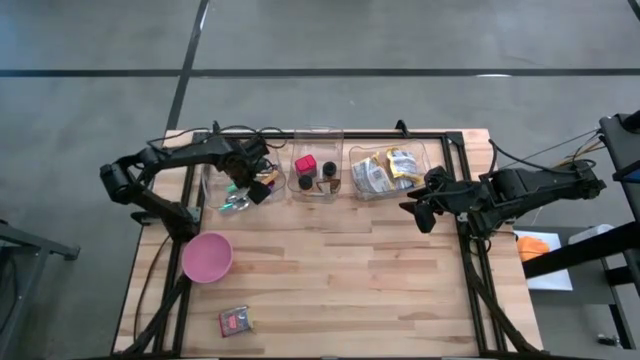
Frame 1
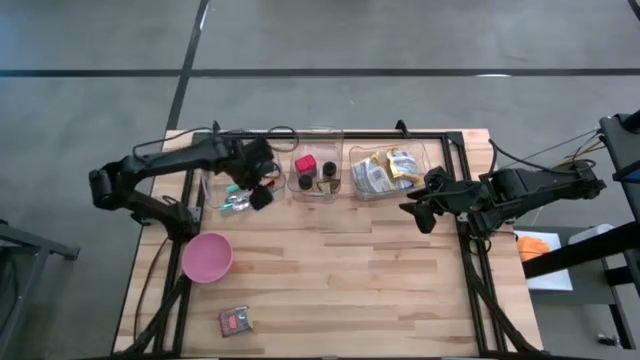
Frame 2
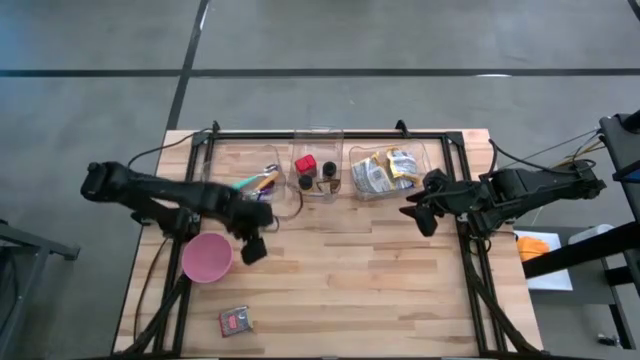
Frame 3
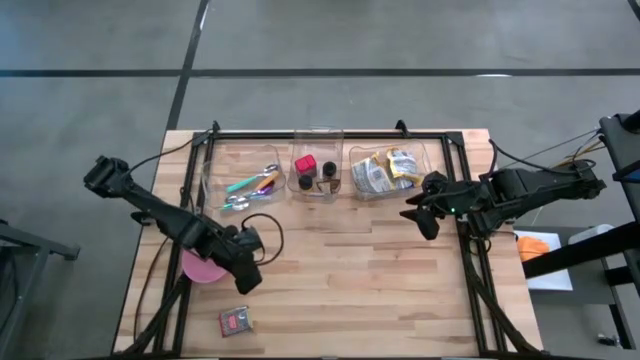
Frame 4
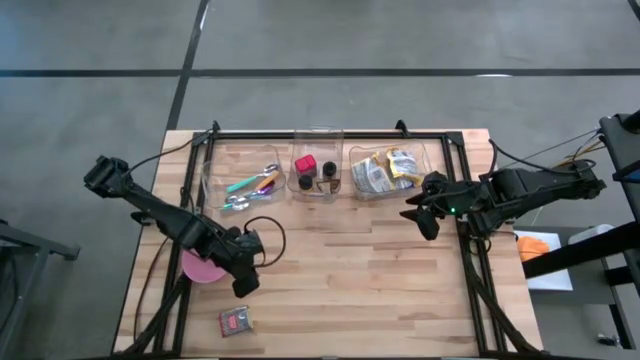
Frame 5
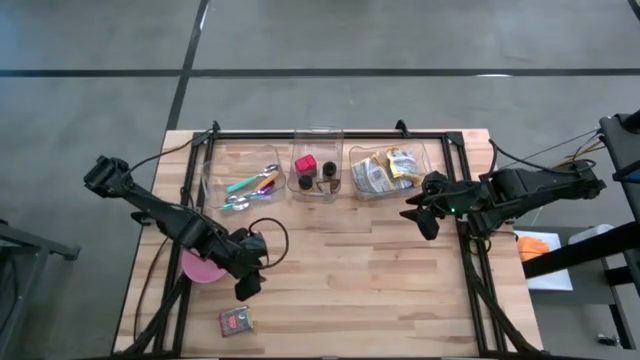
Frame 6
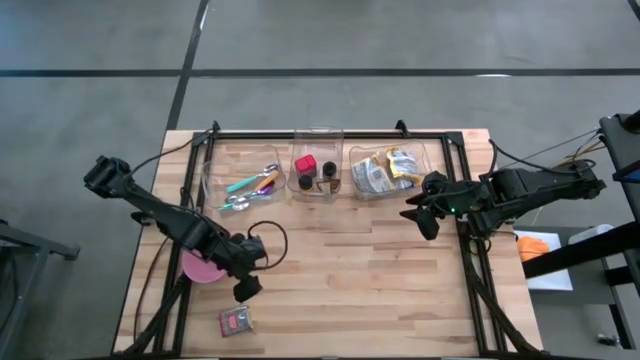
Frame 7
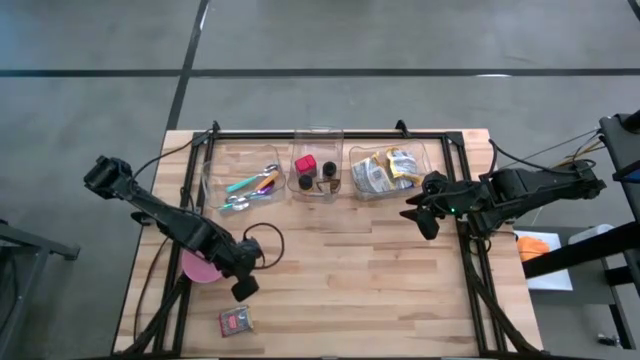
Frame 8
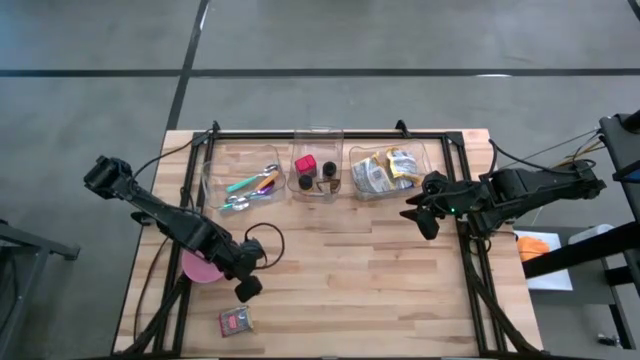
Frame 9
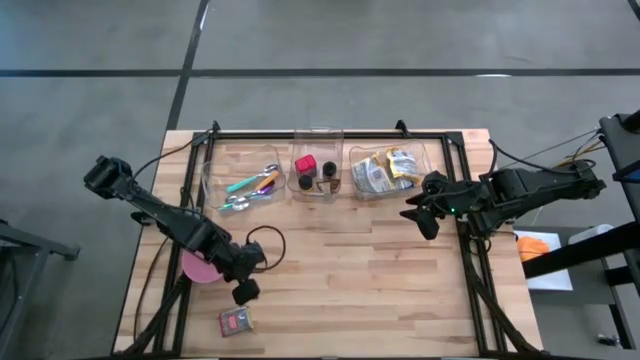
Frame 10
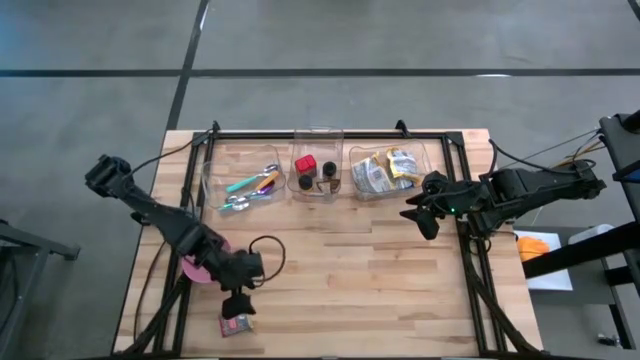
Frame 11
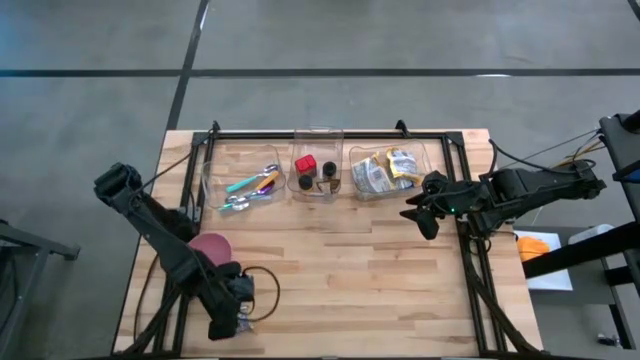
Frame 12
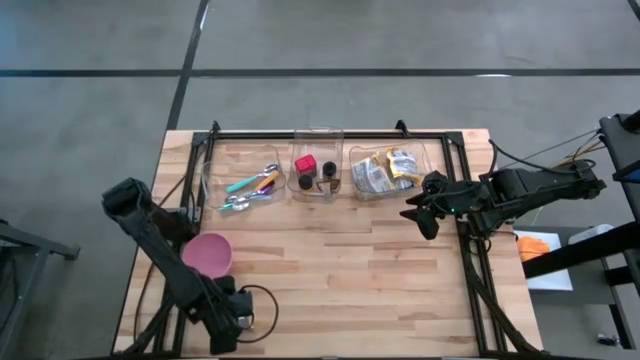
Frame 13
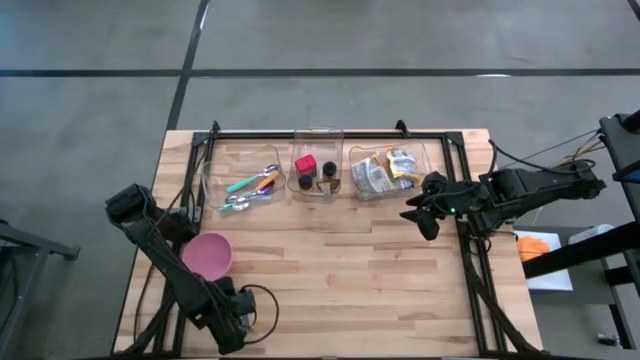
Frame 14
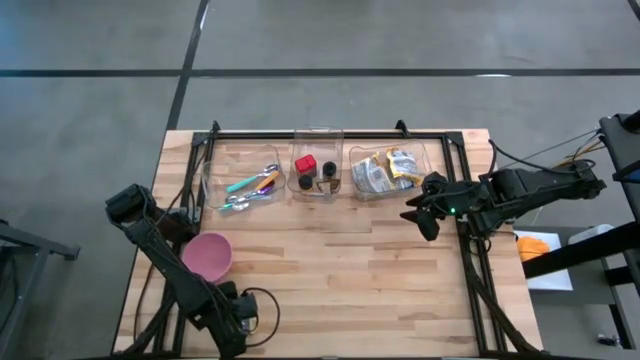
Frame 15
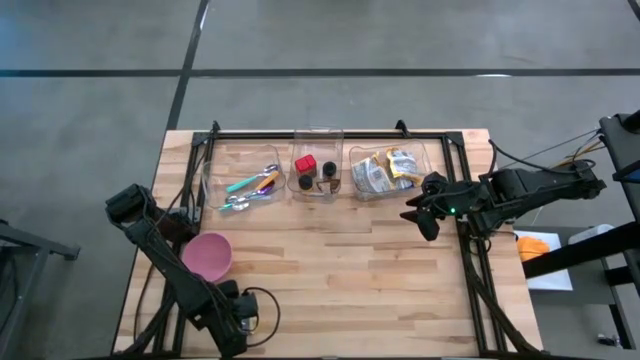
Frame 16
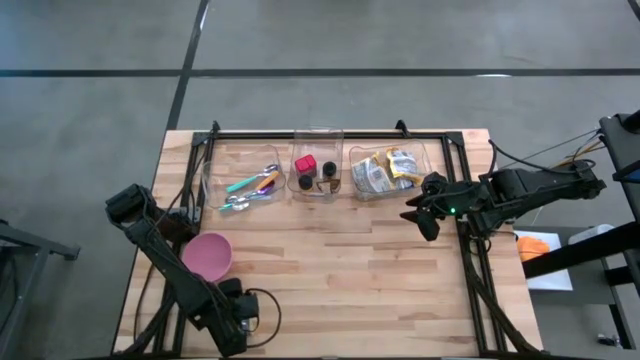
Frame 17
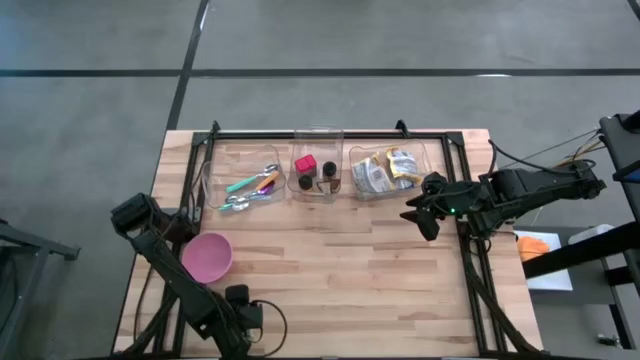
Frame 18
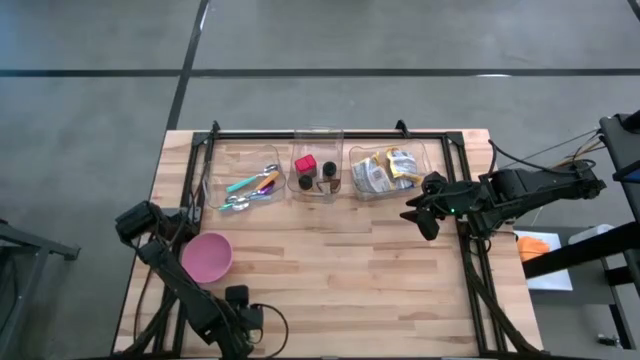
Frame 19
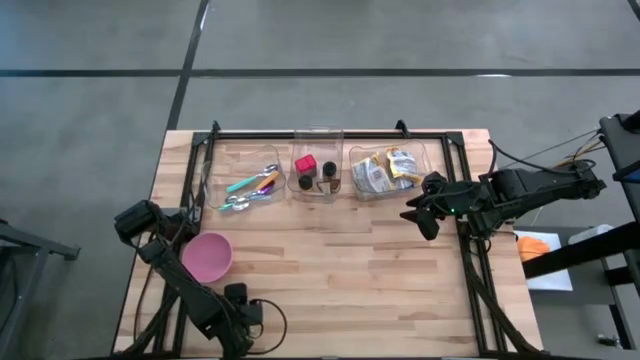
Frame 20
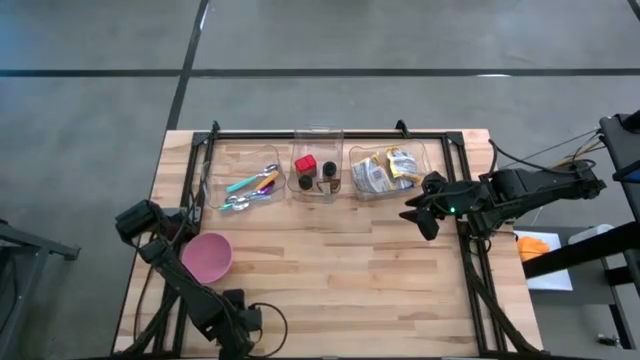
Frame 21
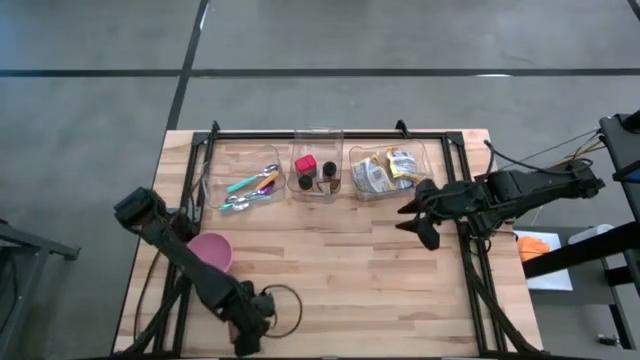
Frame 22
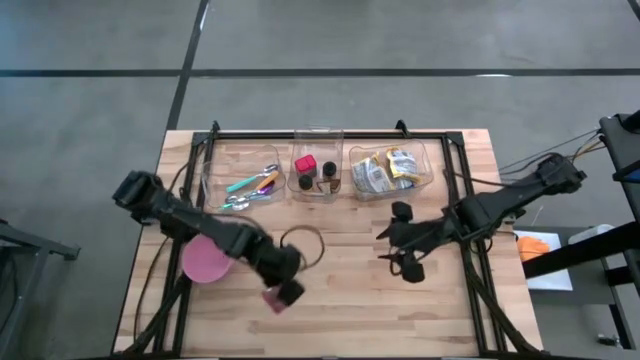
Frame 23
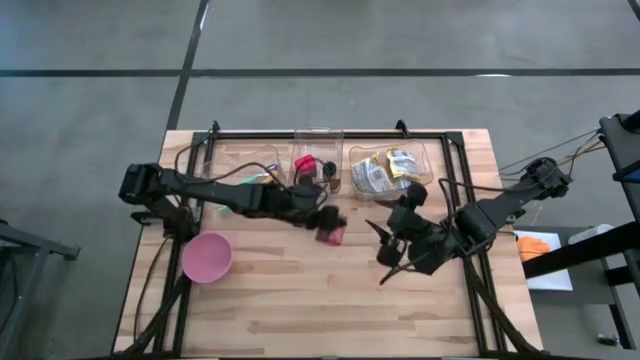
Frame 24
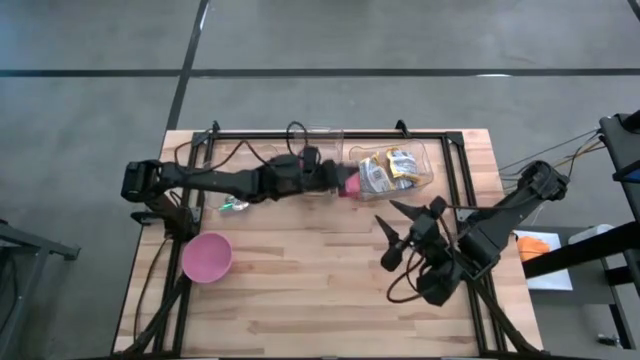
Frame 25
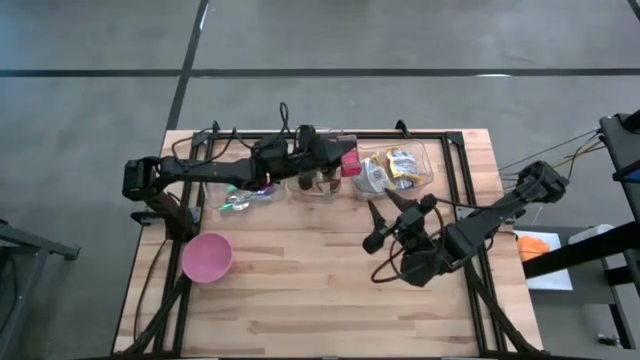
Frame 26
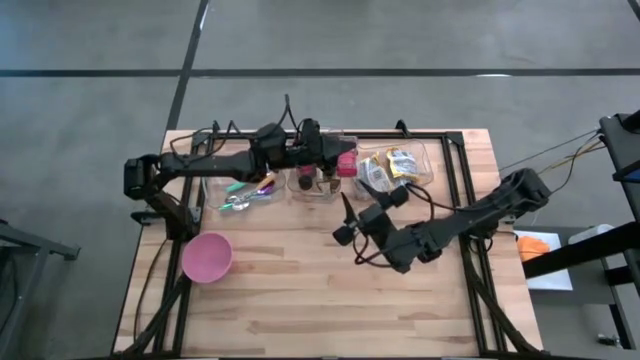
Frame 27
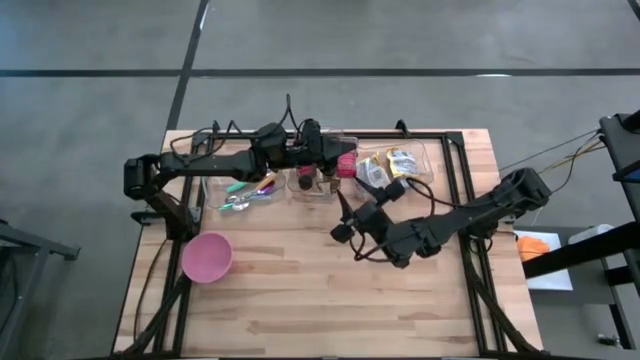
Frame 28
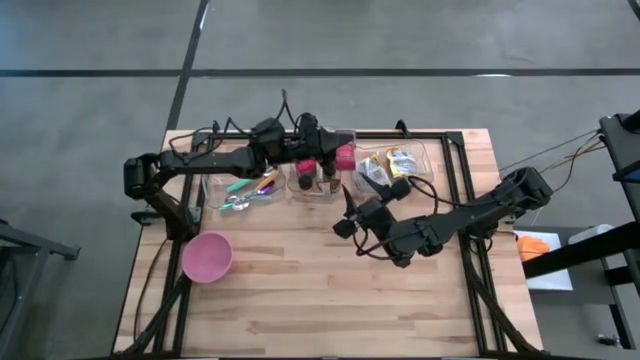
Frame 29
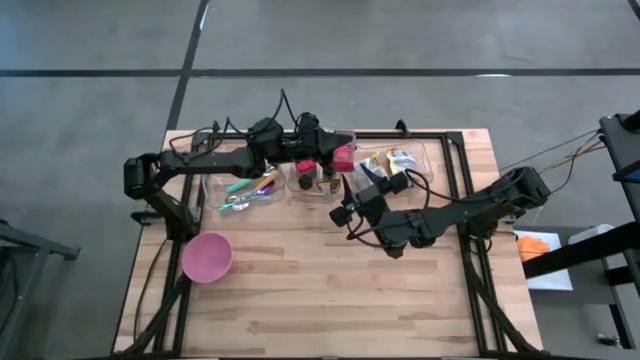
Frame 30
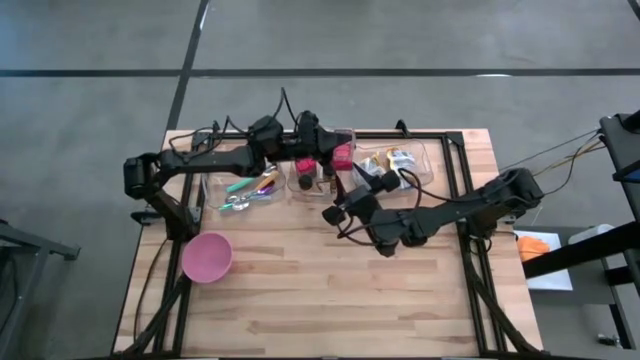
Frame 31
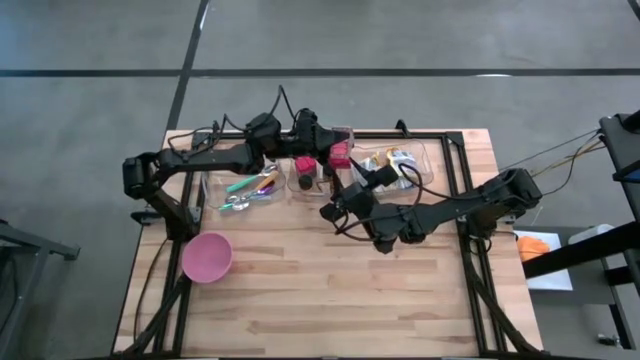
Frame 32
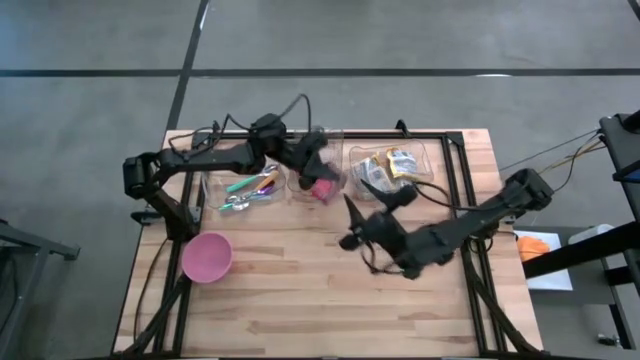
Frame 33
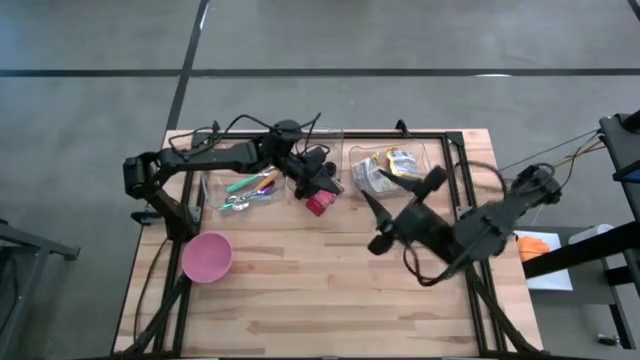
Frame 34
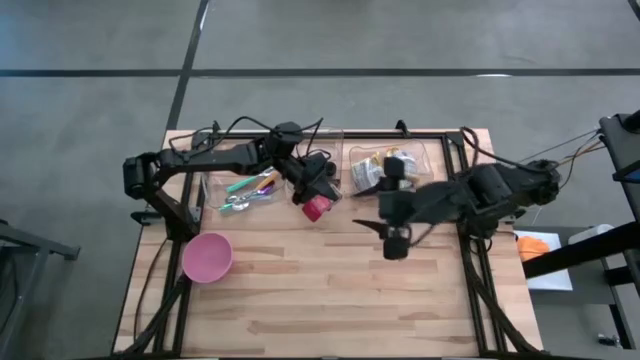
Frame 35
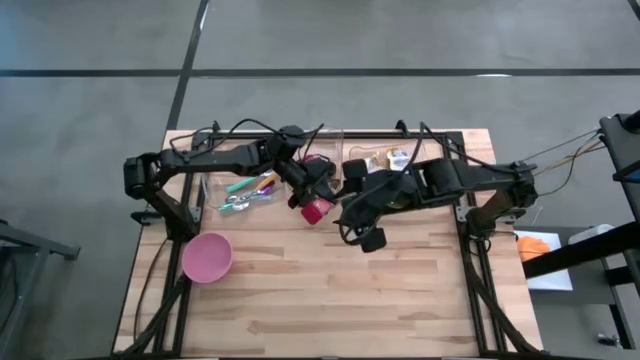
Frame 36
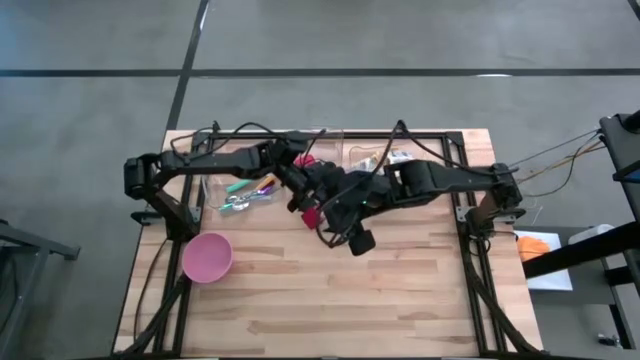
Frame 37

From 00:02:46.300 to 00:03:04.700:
Put the red seasoning can into the middle transparent bin
